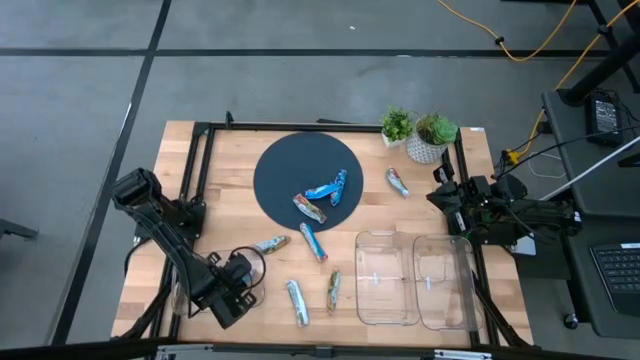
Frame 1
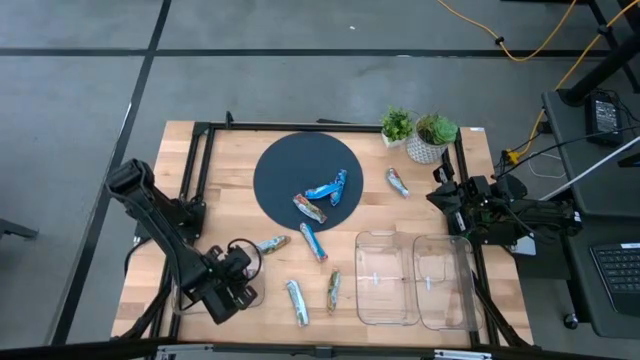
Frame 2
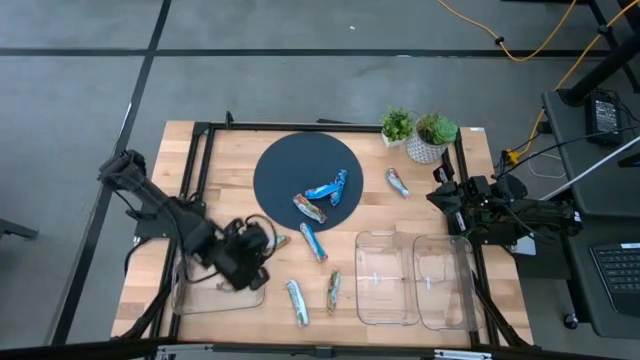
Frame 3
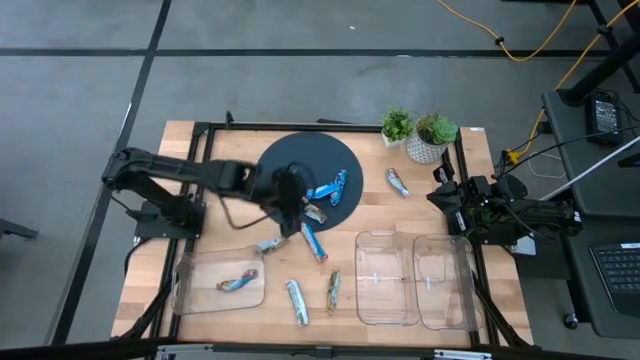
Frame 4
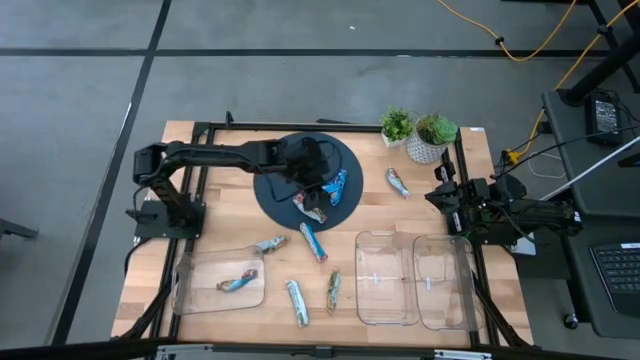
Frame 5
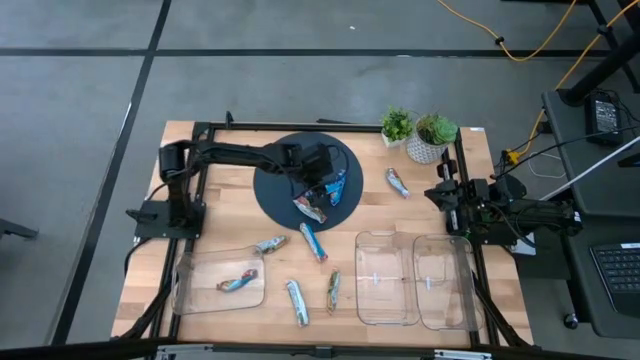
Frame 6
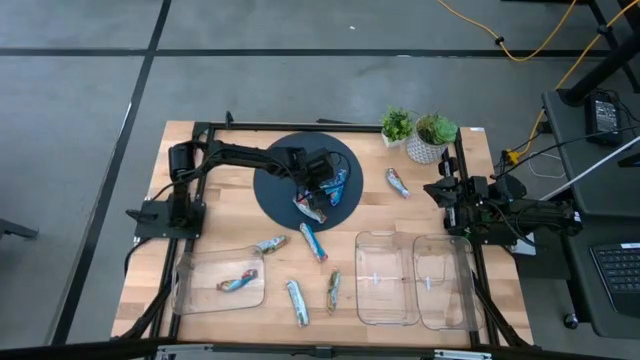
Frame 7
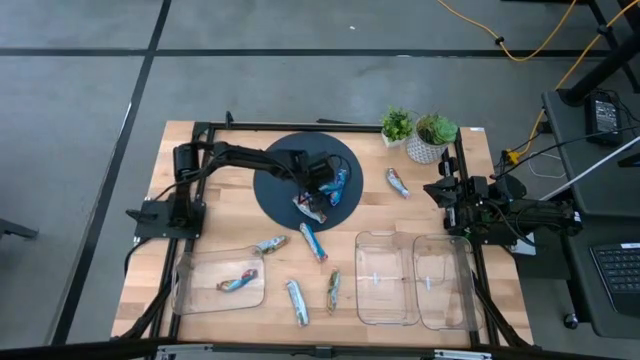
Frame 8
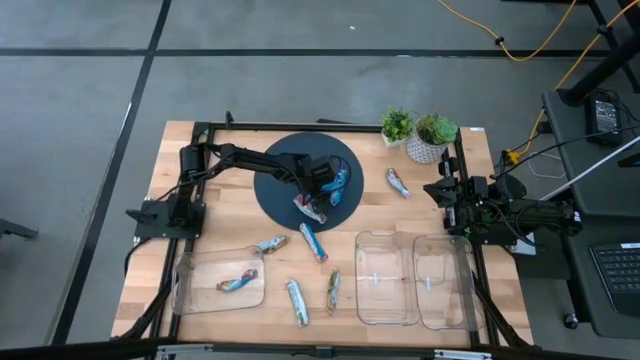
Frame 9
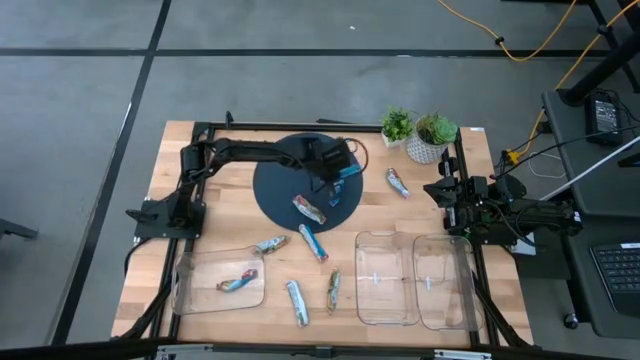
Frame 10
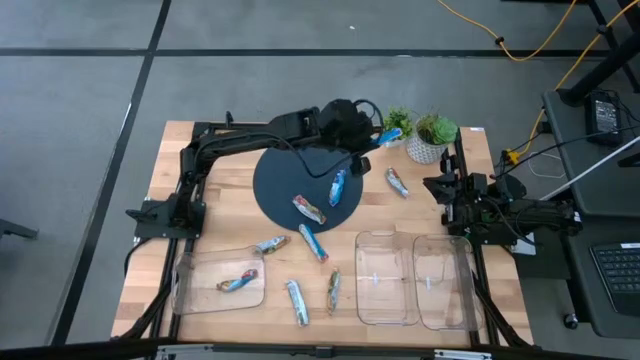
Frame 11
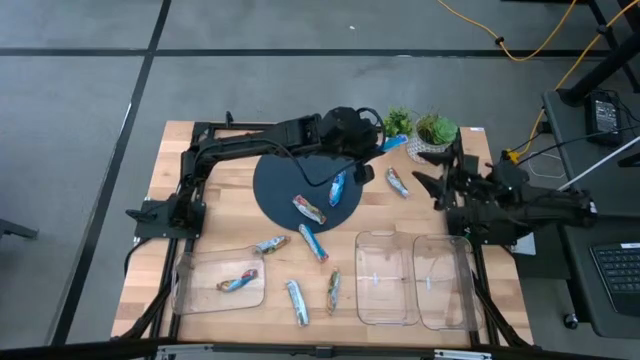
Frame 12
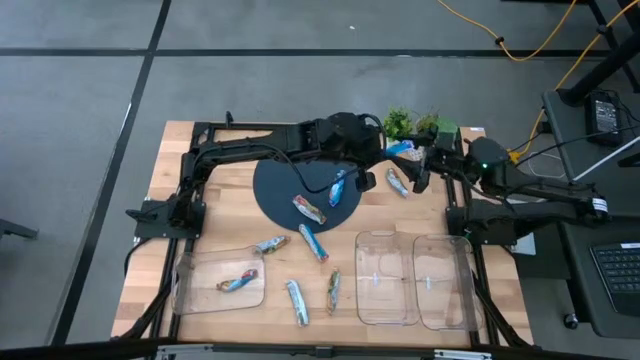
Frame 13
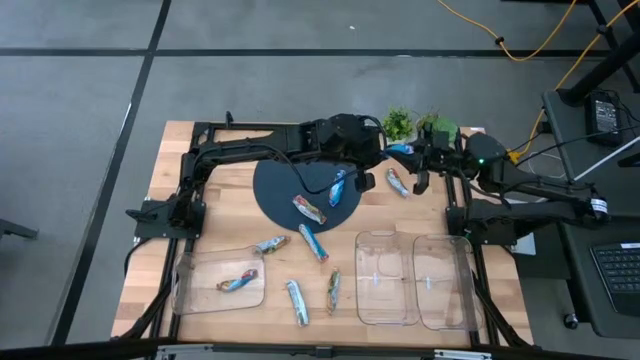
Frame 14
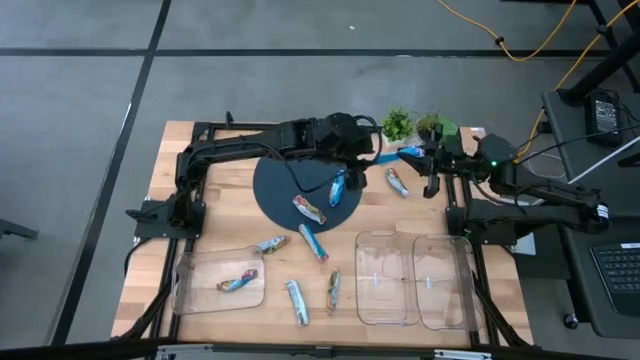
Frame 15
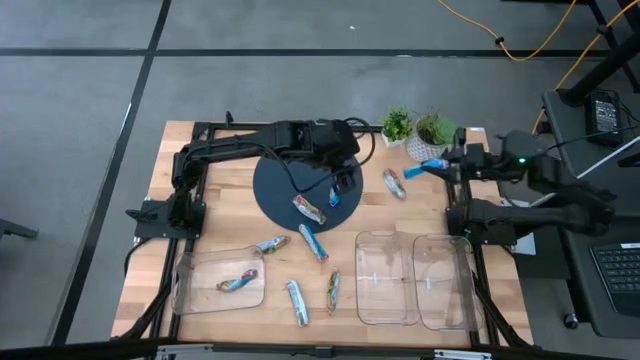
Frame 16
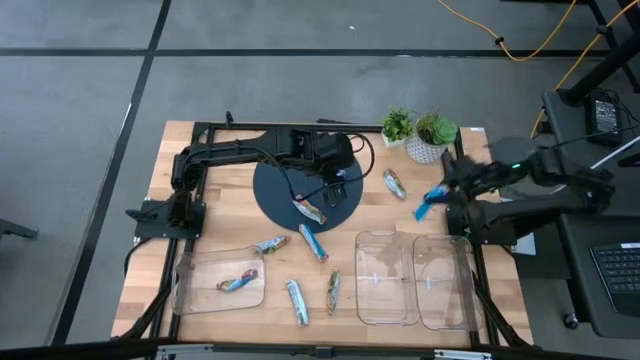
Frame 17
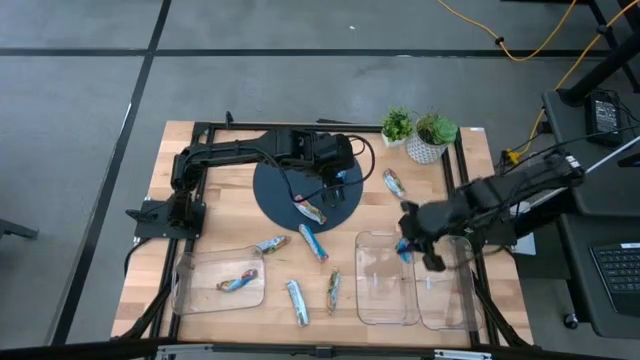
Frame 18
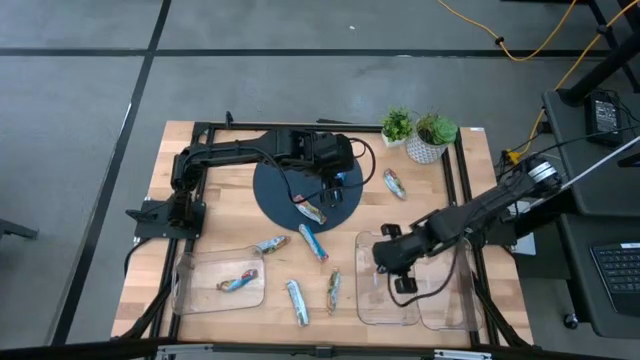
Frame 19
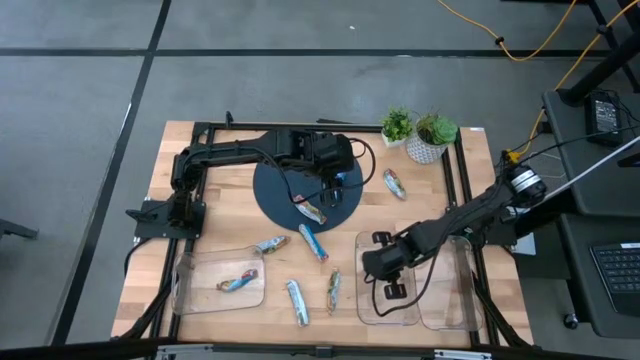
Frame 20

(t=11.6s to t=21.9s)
Task: Pick and place Granola Bars by type
Put the blue granola bar into the middle transparent bin

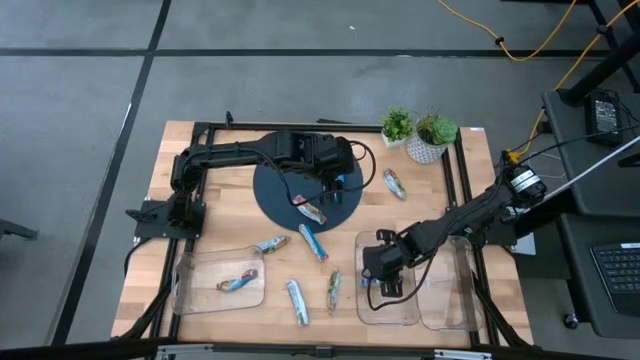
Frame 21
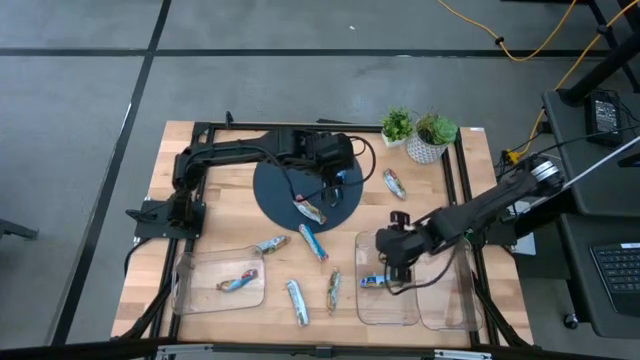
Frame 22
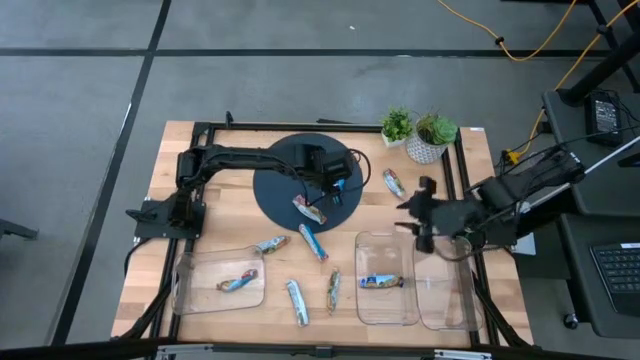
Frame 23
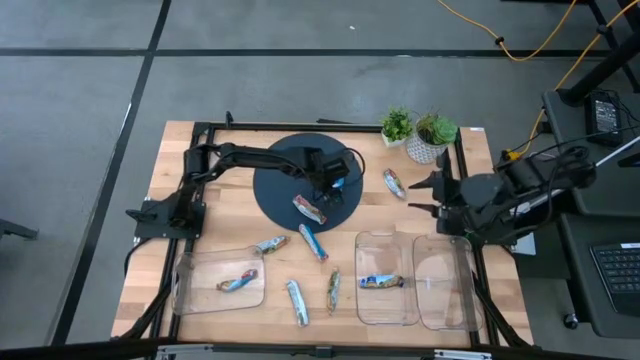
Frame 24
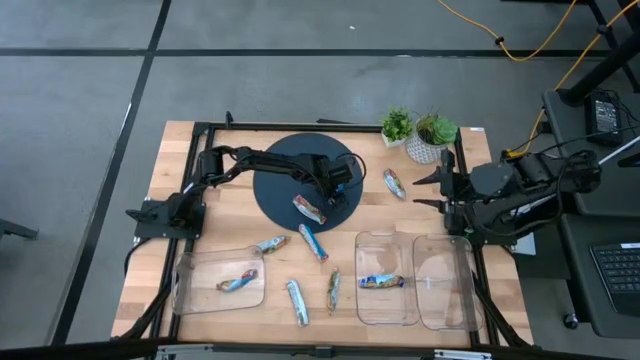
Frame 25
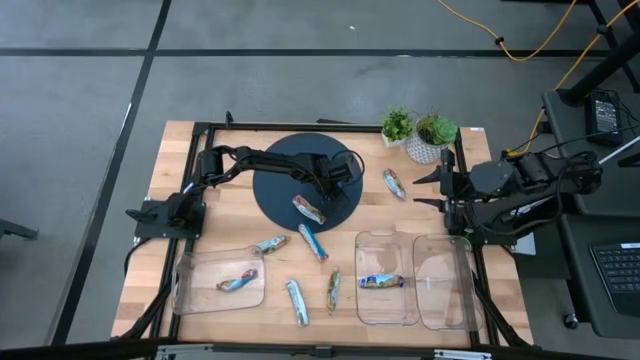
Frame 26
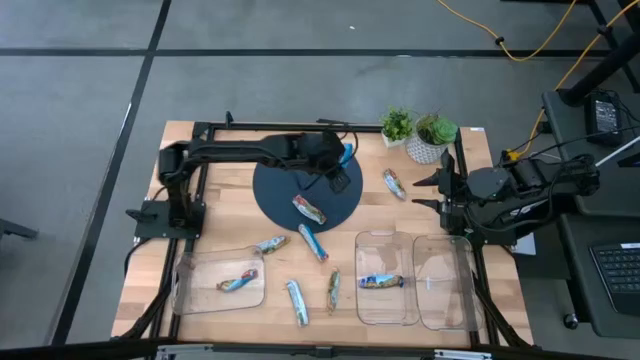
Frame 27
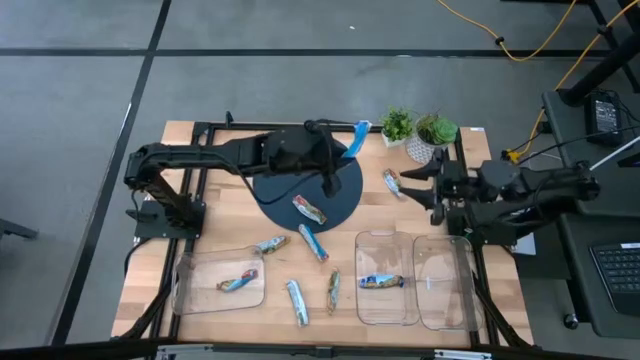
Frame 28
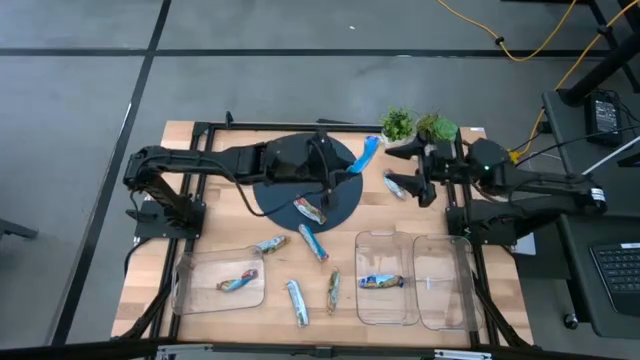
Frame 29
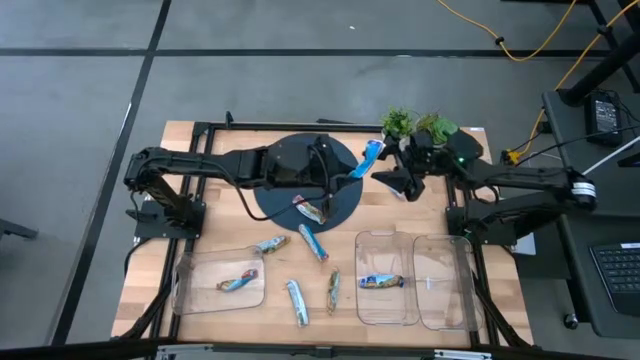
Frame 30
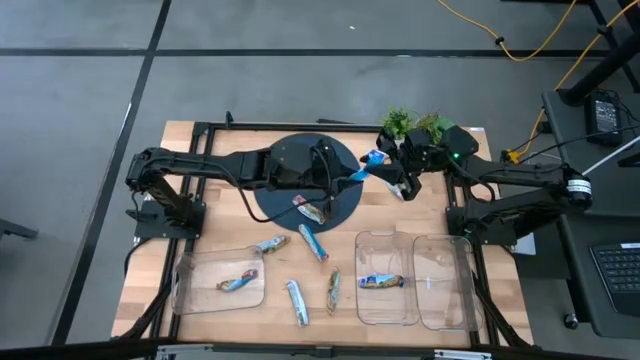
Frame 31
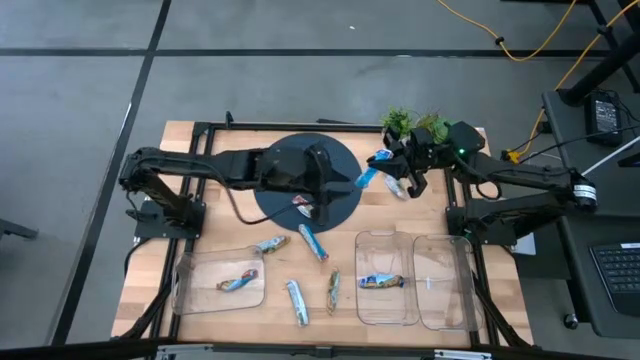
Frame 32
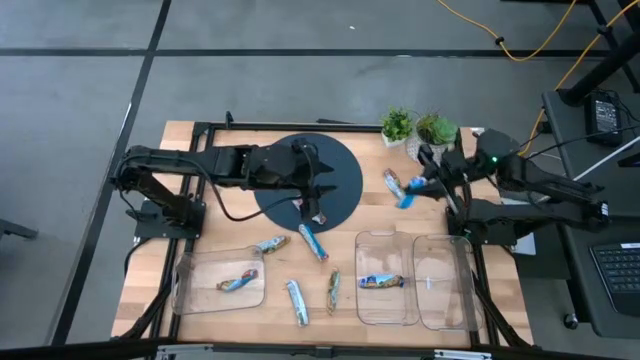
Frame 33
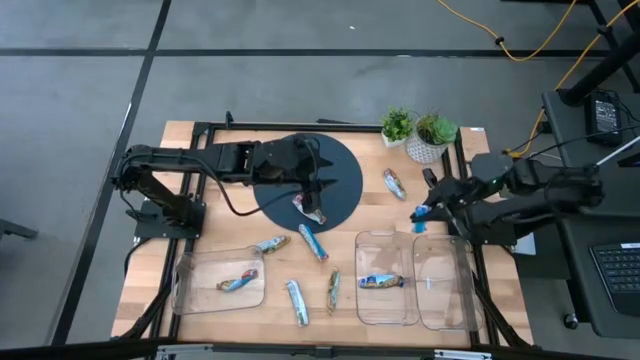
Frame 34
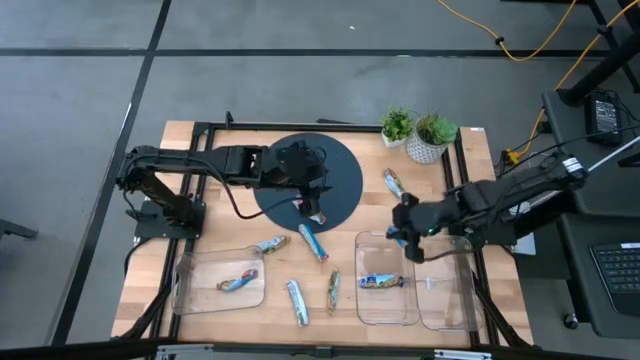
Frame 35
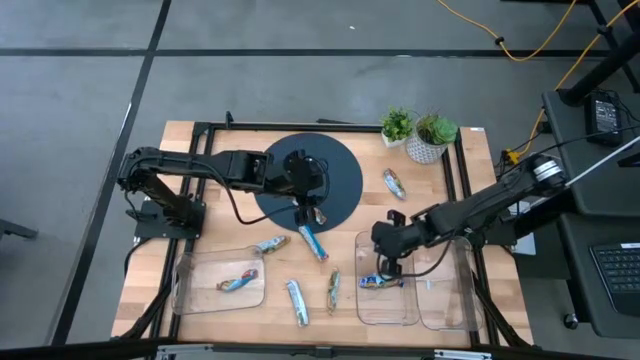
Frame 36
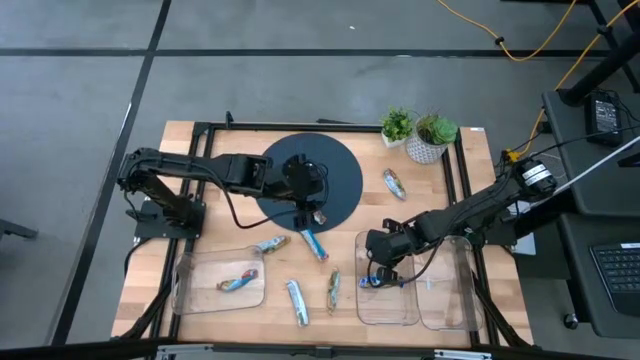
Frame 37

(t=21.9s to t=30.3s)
Put the blue granola bar into the middle transparent bin

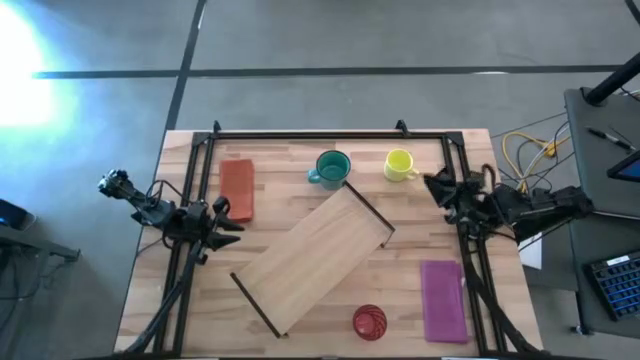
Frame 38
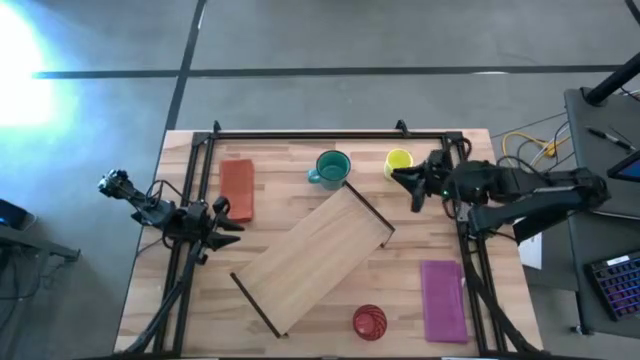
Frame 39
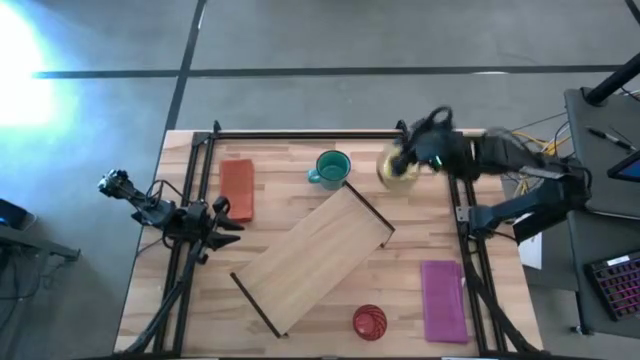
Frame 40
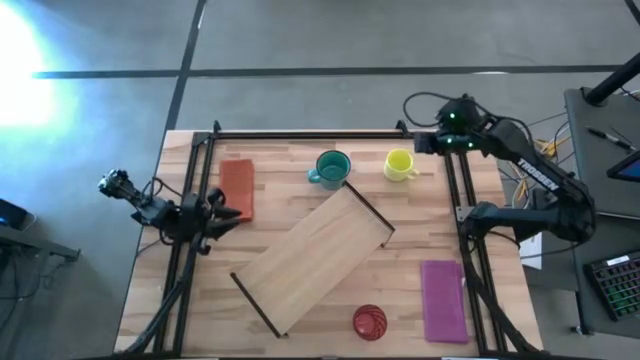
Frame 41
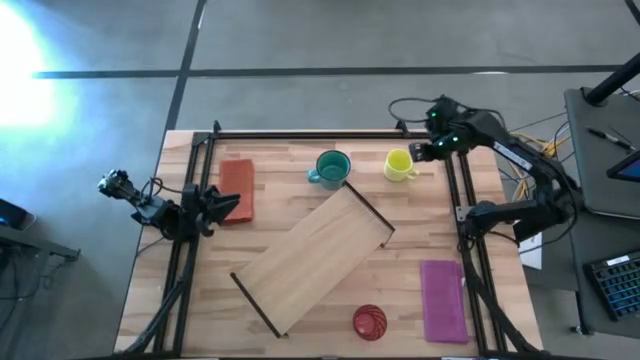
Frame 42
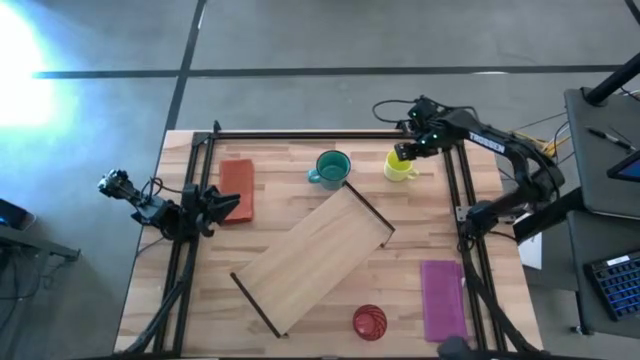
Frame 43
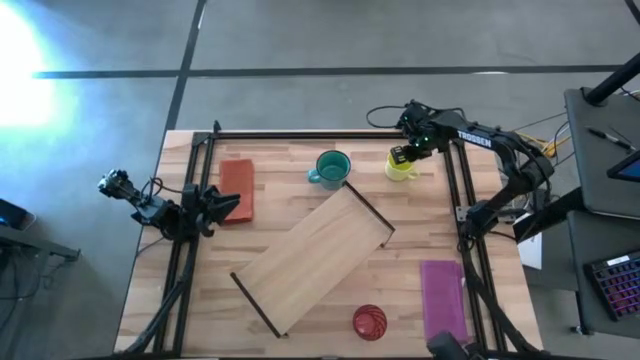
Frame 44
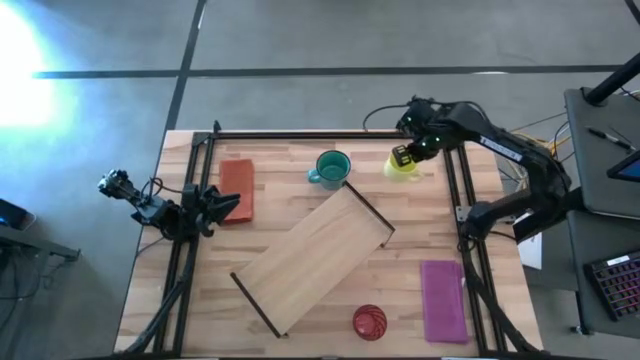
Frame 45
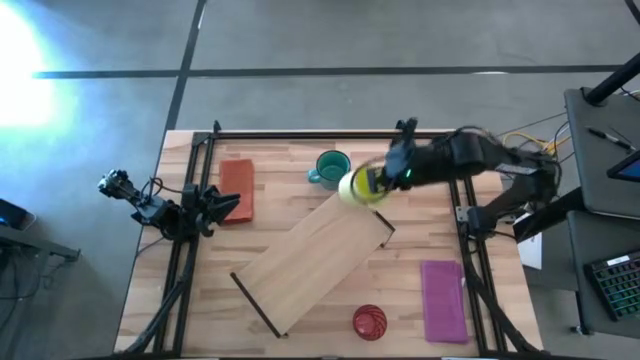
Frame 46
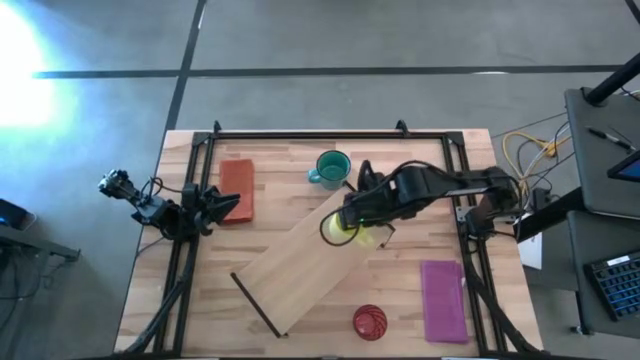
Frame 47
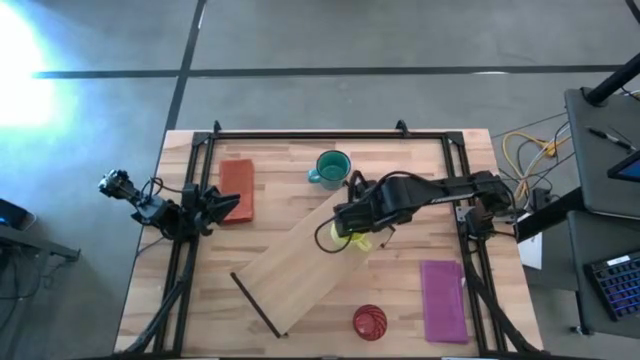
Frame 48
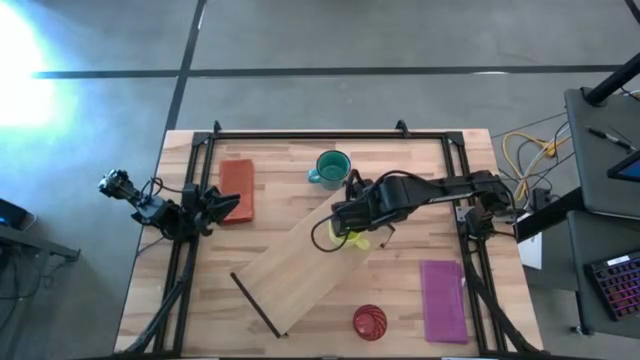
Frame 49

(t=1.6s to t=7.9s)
Task: Stack small to large cups/mugs on shelf
Put the yellow mug on the shelf
